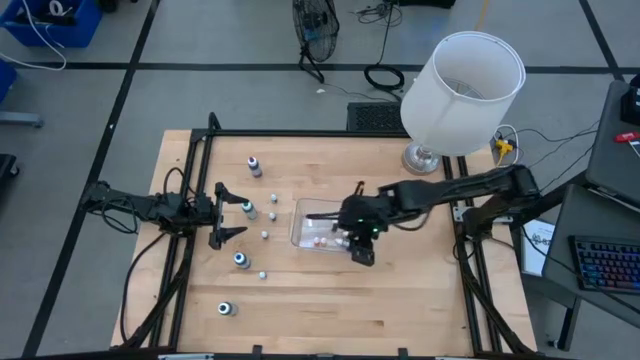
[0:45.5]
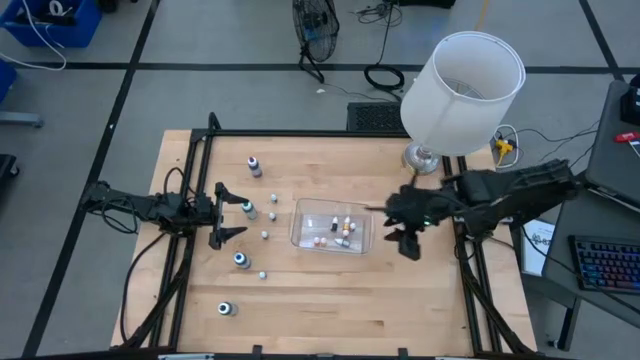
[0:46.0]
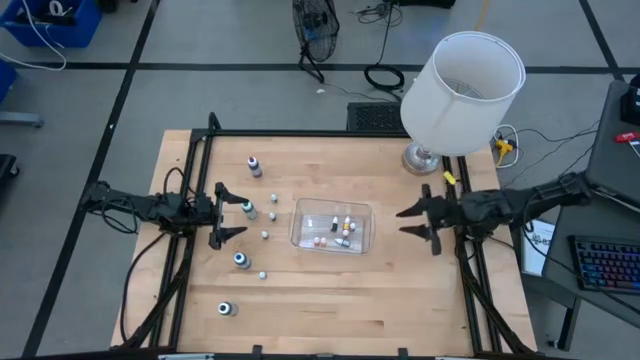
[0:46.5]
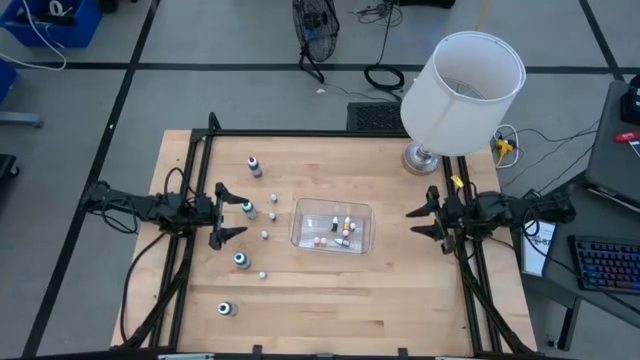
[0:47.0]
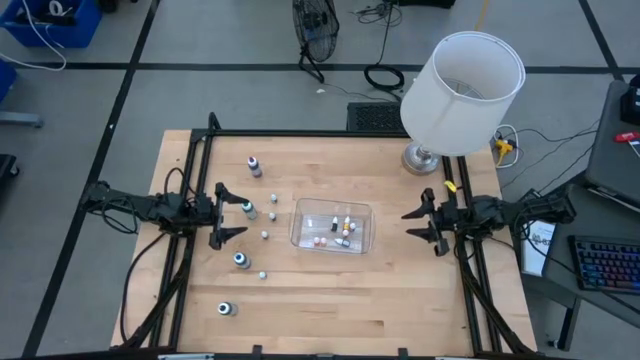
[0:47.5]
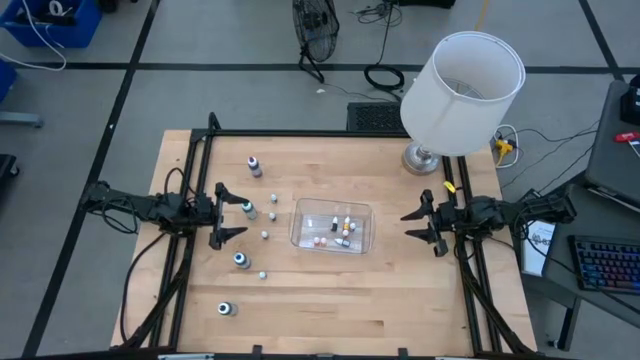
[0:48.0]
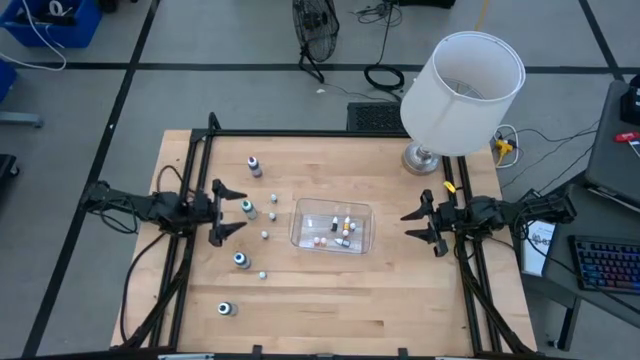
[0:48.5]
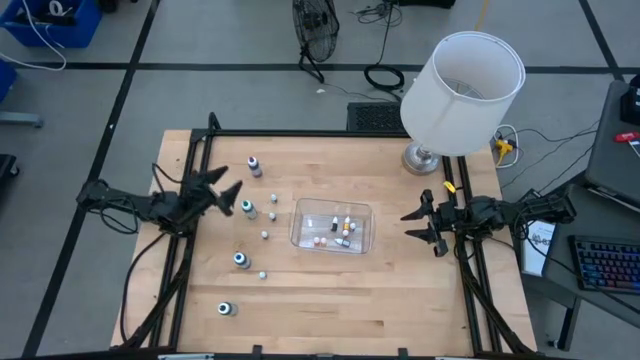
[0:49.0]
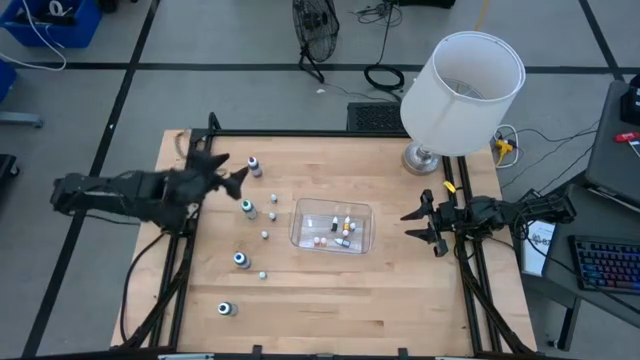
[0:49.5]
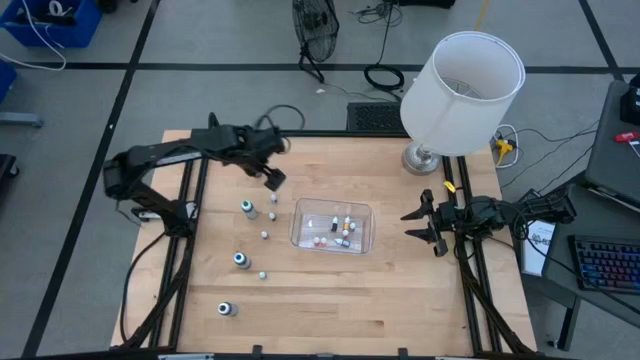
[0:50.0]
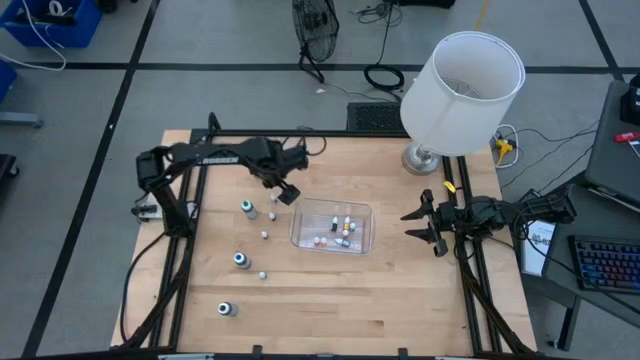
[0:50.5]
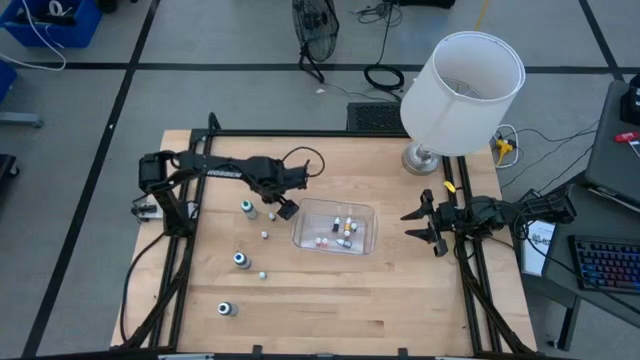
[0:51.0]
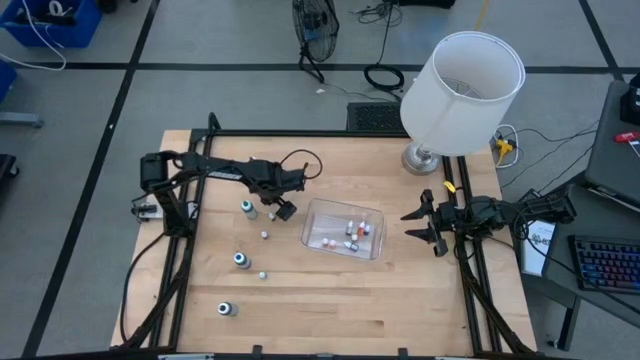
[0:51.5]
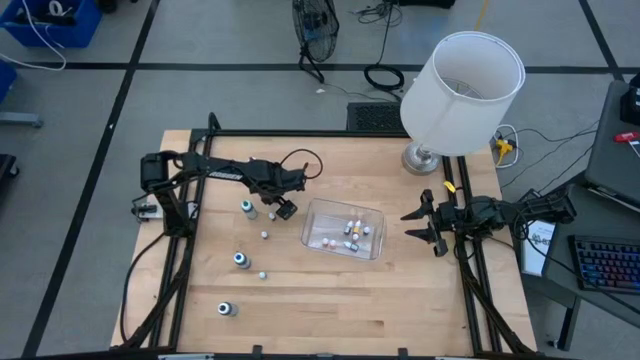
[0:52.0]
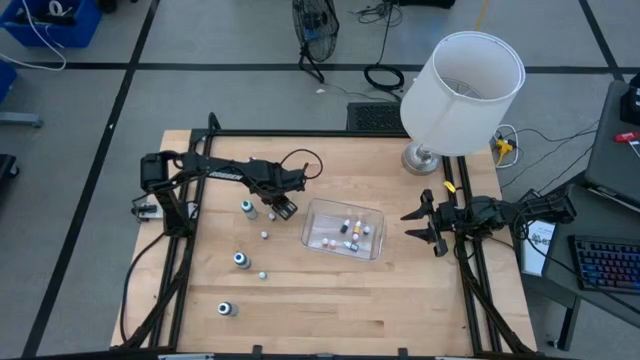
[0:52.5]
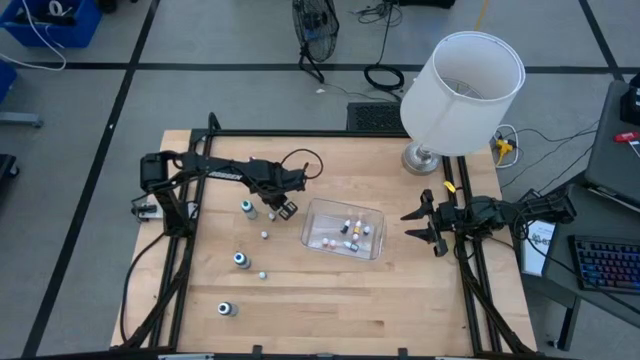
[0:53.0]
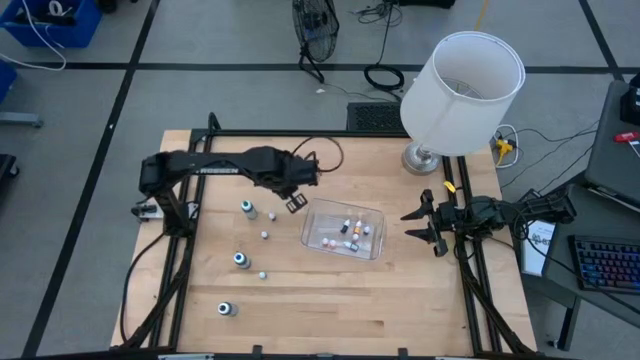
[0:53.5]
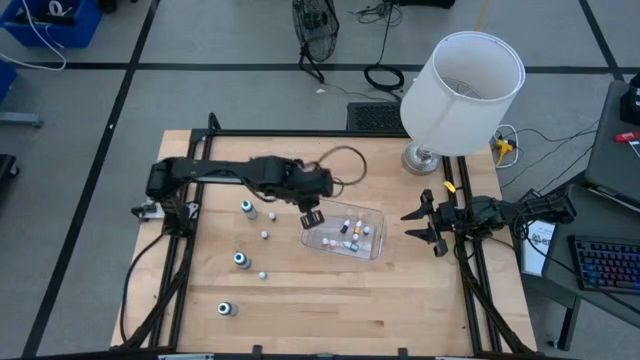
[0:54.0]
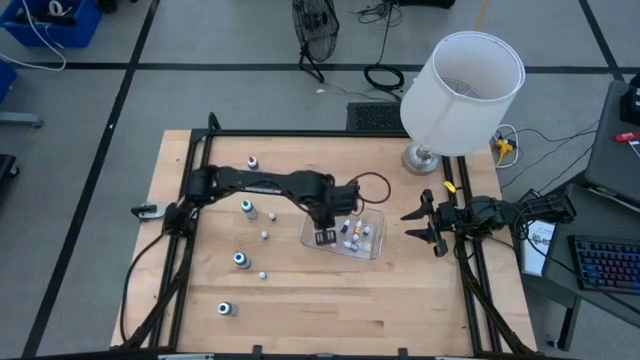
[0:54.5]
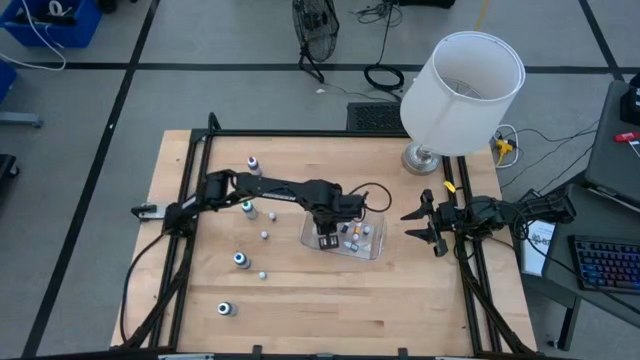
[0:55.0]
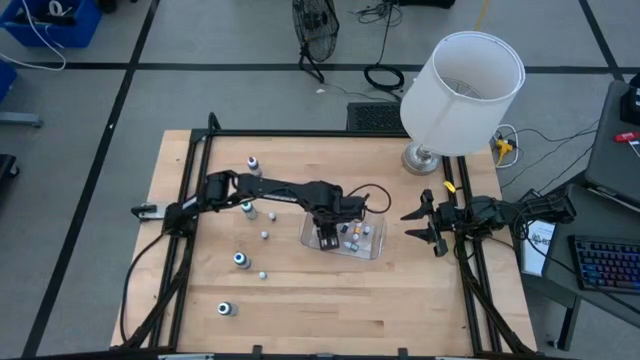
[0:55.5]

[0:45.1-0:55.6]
Task: Pick & Place food coloring
Put the small black food coloring bottle into the transparent bin

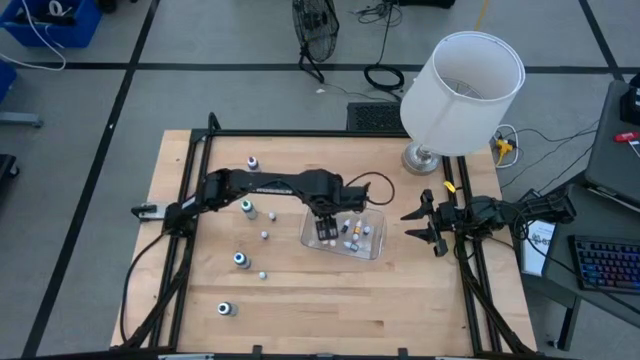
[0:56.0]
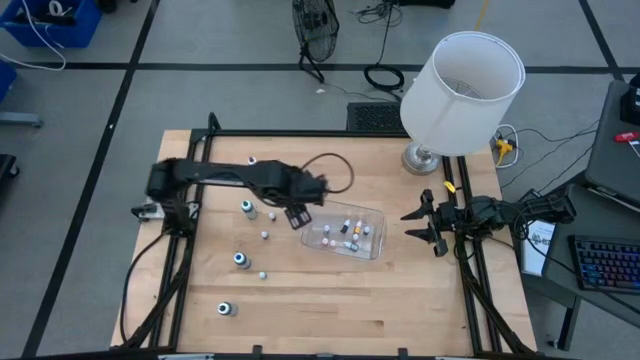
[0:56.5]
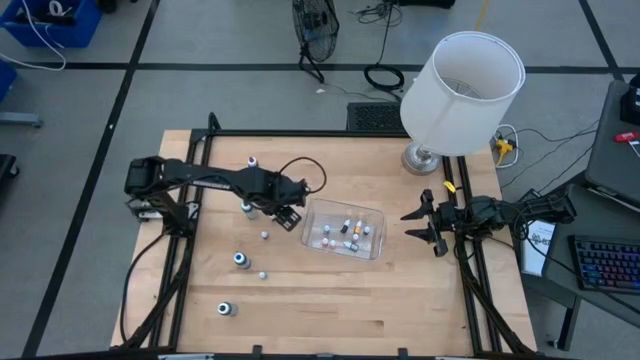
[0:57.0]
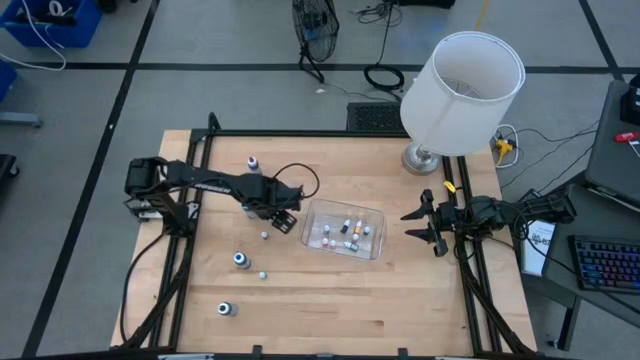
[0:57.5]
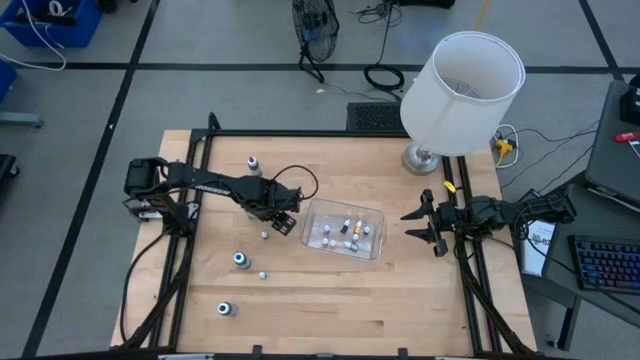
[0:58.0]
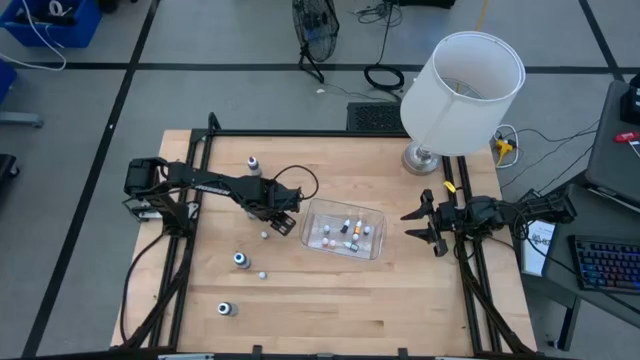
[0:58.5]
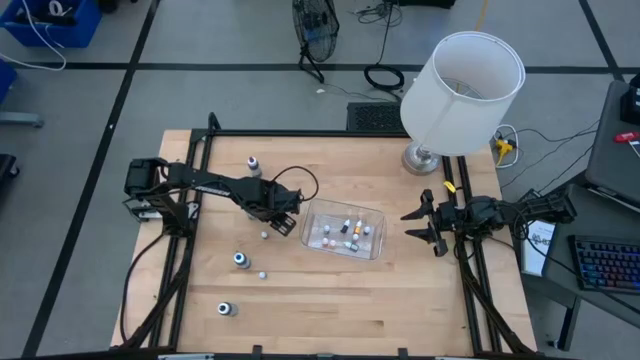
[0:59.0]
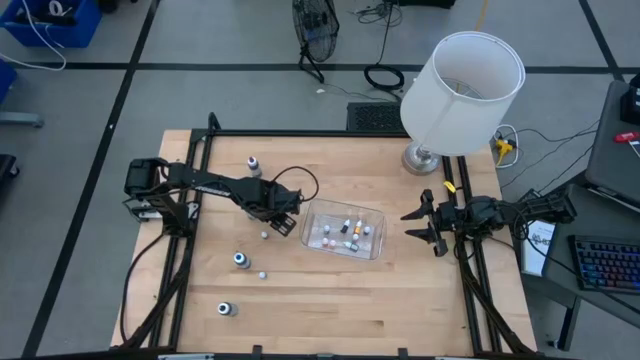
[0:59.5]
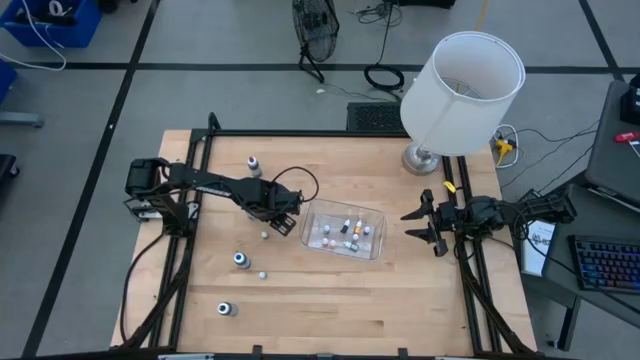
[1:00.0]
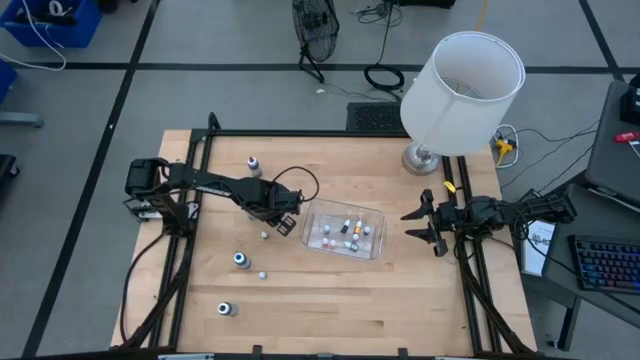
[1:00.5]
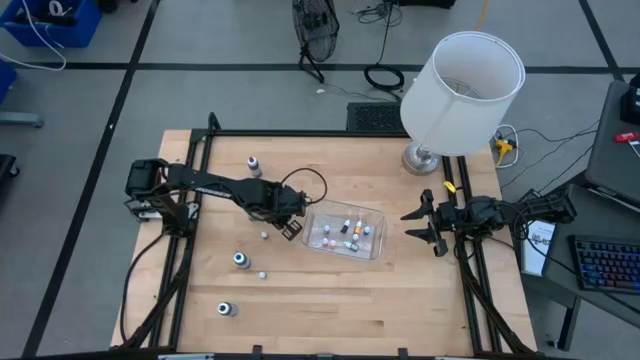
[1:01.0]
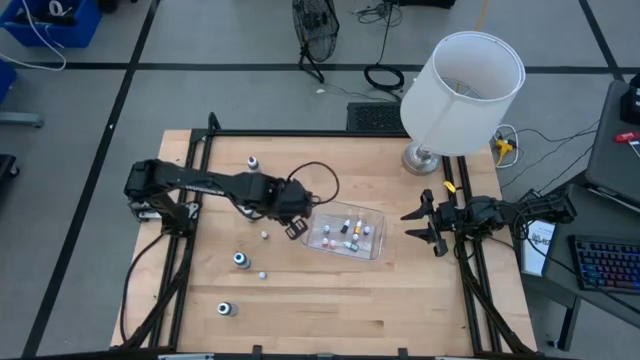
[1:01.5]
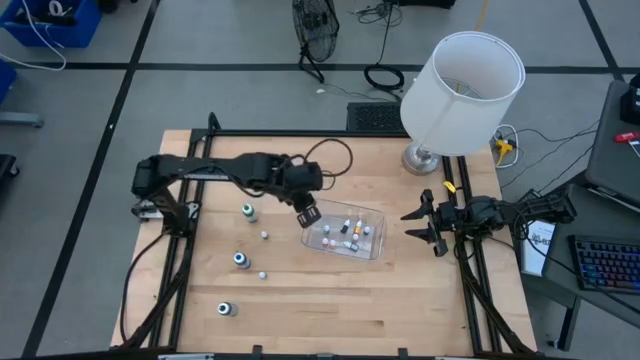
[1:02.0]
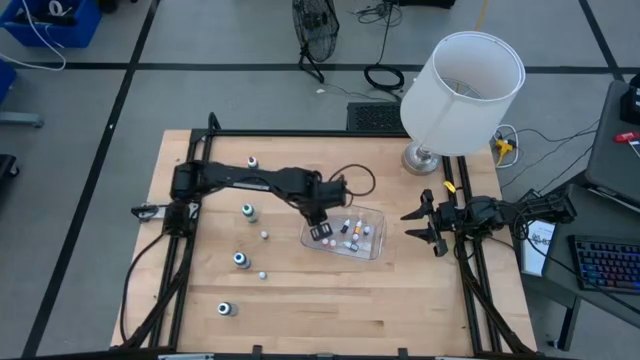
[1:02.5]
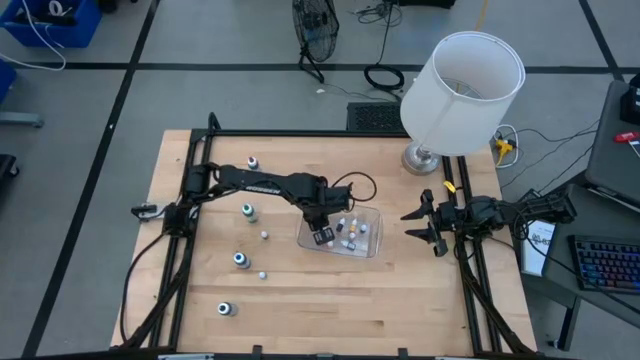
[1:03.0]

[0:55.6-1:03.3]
Put the small black food coloring bottle into the transparent bin

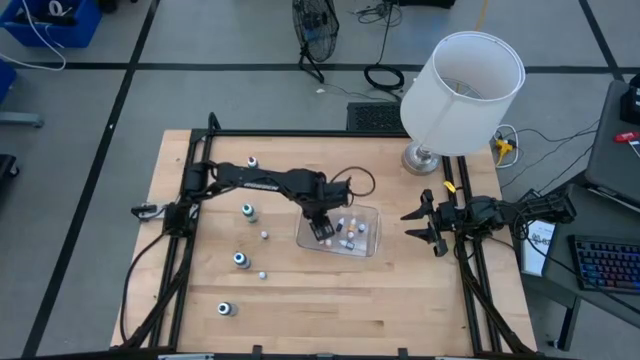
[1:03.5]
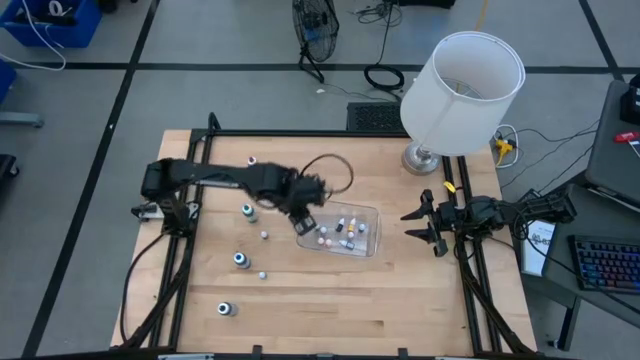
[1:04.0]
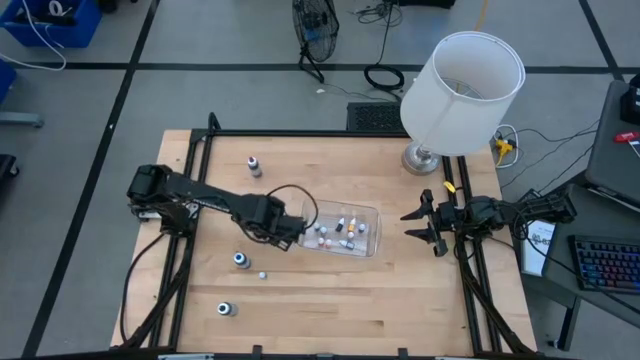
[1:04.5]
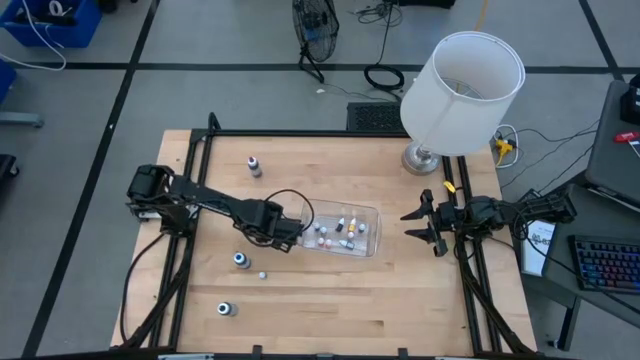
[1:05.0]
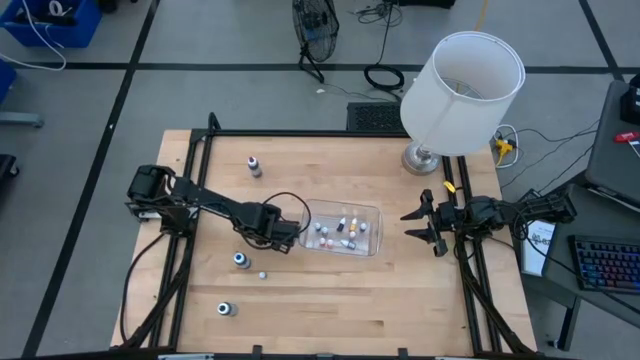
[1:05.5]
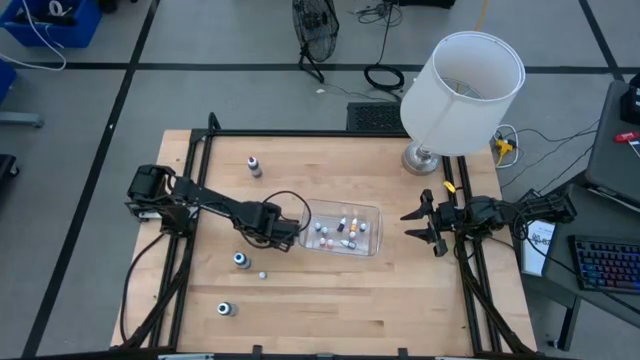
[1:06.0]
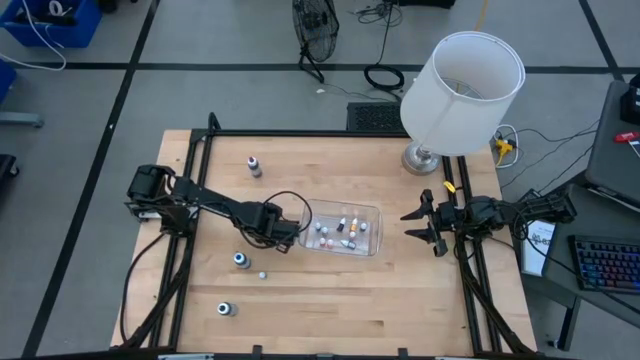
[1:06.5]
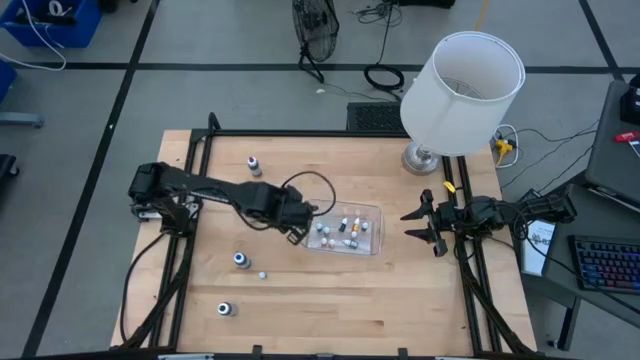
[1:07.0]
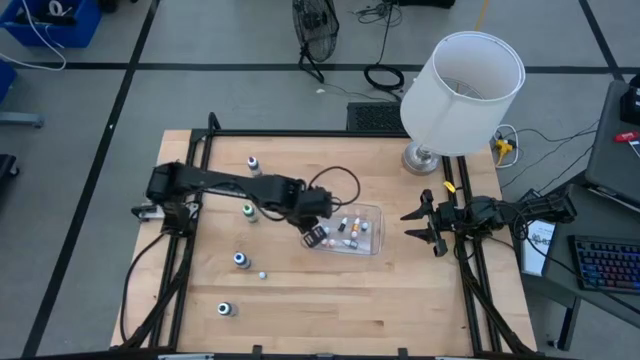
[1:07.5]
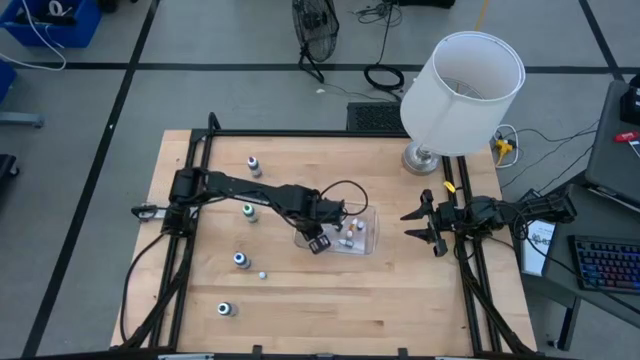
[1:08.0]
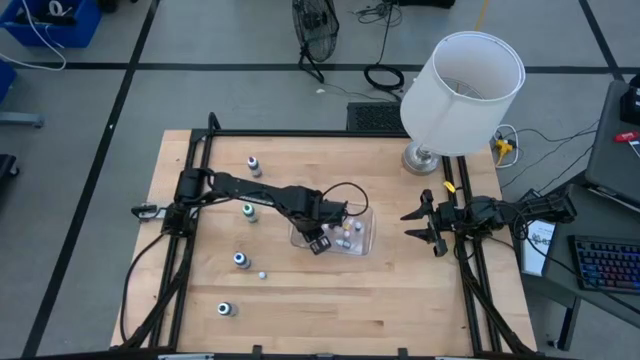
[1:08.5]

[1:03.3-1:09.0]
Put the small red food coloring bottle into the transparent bin
